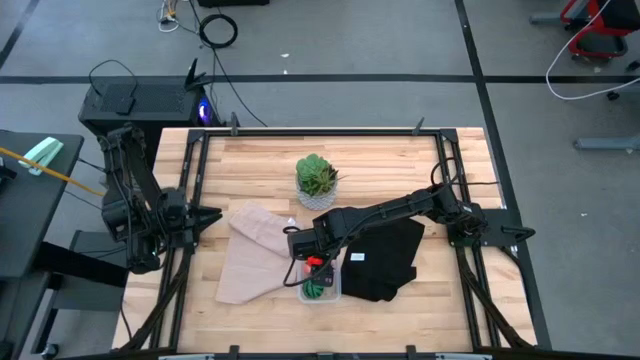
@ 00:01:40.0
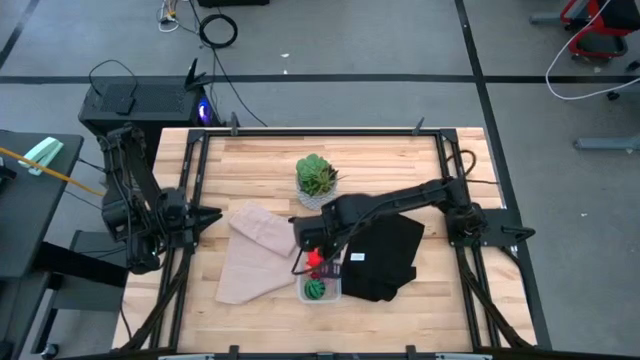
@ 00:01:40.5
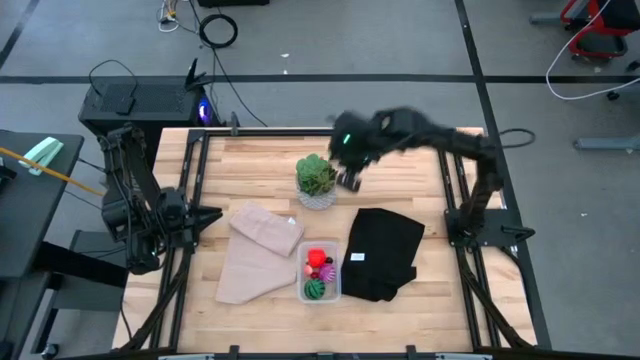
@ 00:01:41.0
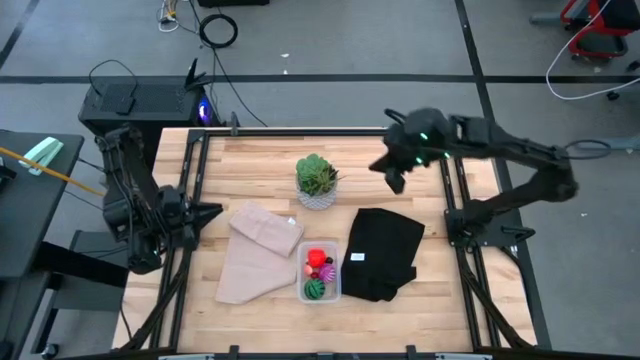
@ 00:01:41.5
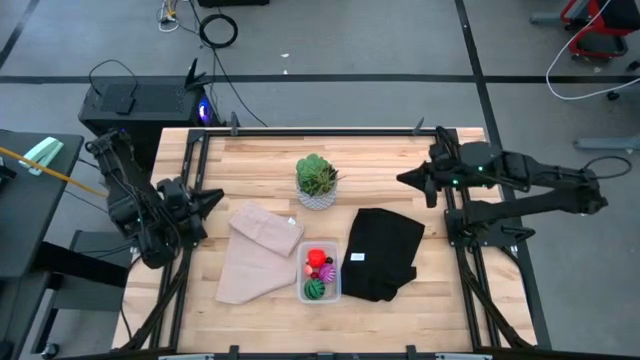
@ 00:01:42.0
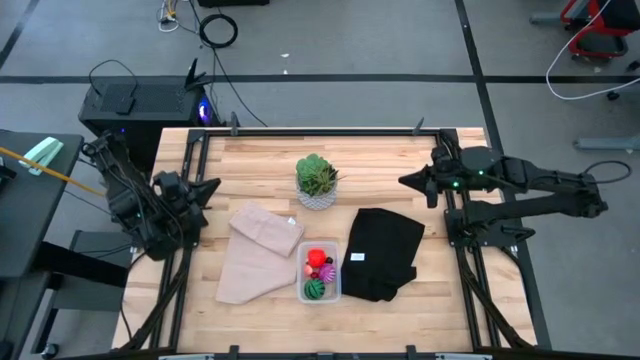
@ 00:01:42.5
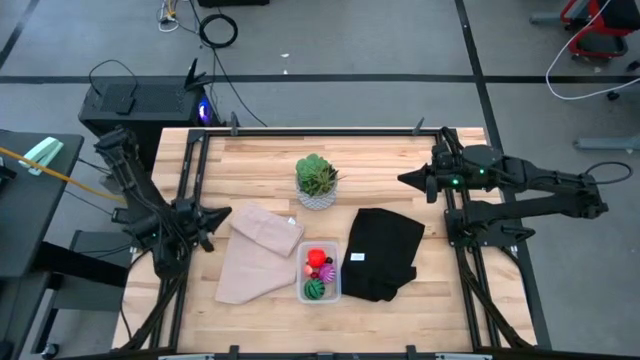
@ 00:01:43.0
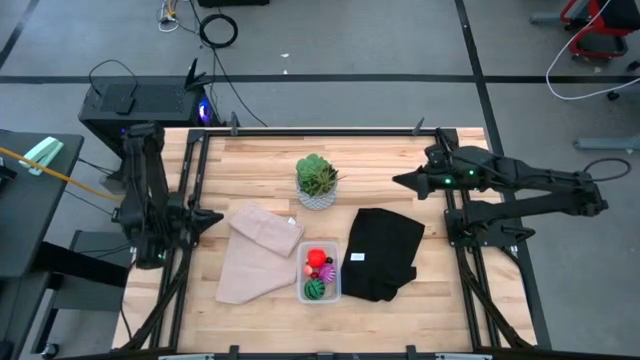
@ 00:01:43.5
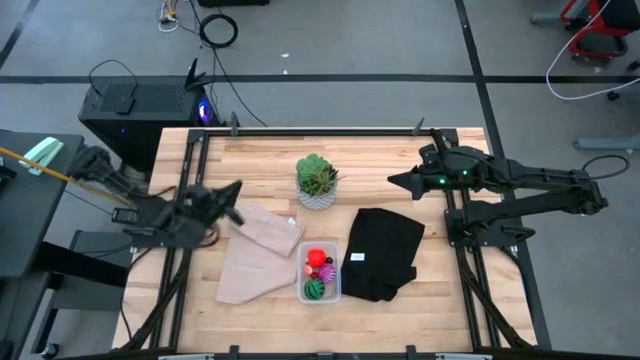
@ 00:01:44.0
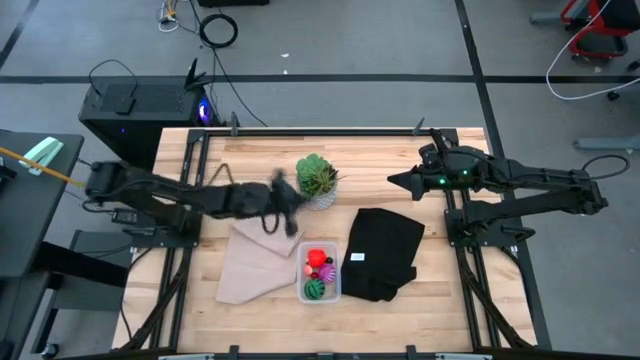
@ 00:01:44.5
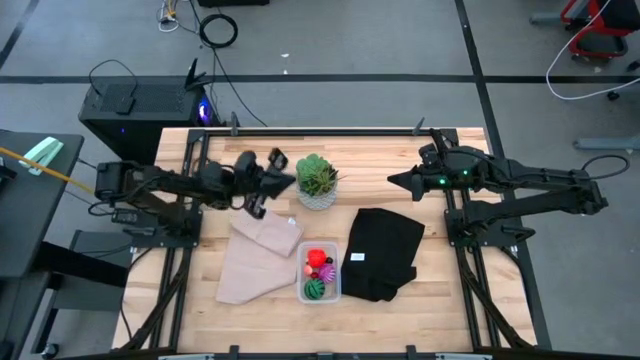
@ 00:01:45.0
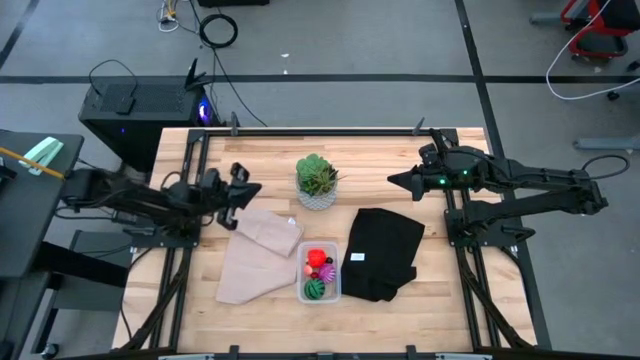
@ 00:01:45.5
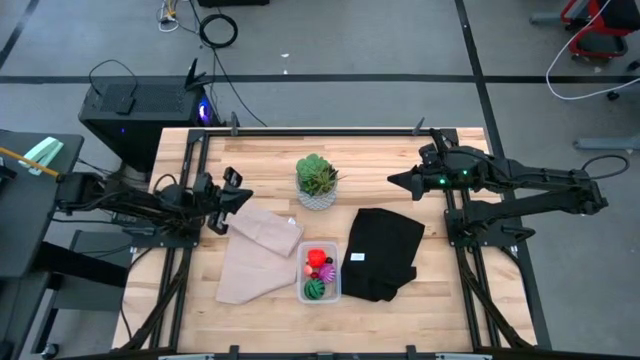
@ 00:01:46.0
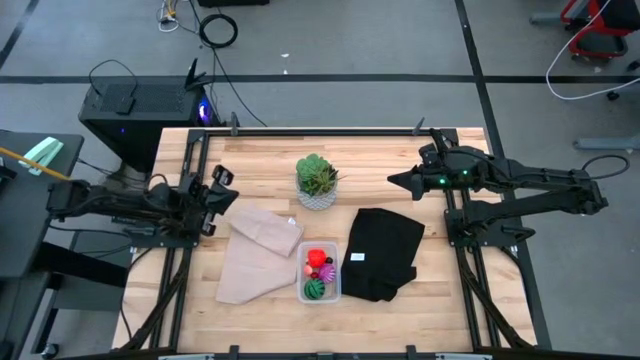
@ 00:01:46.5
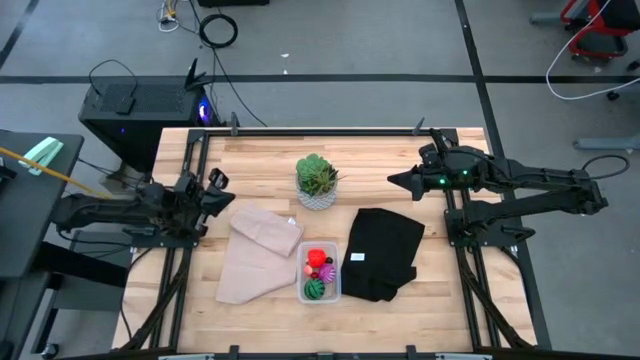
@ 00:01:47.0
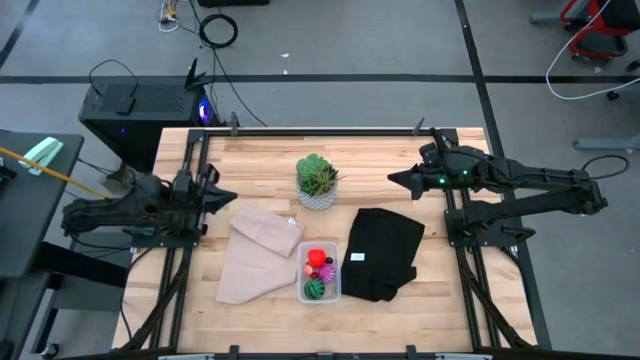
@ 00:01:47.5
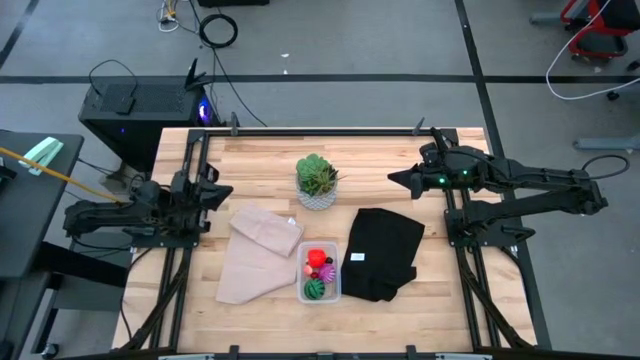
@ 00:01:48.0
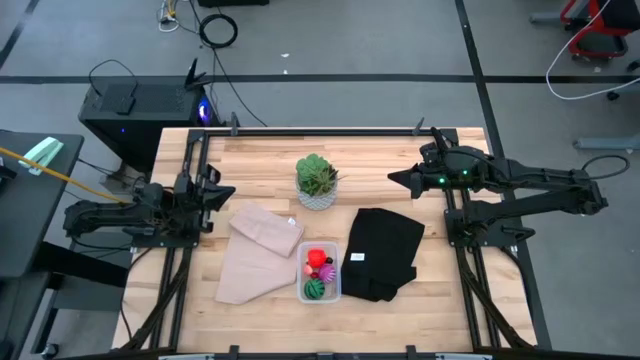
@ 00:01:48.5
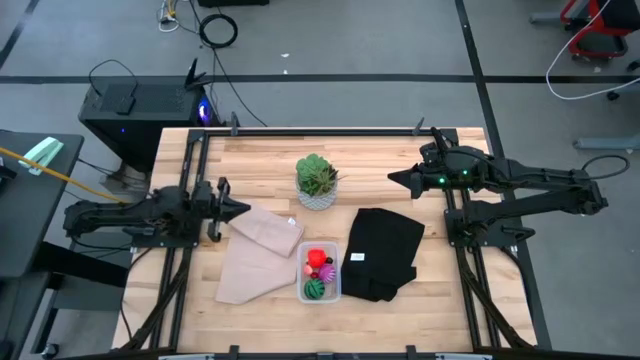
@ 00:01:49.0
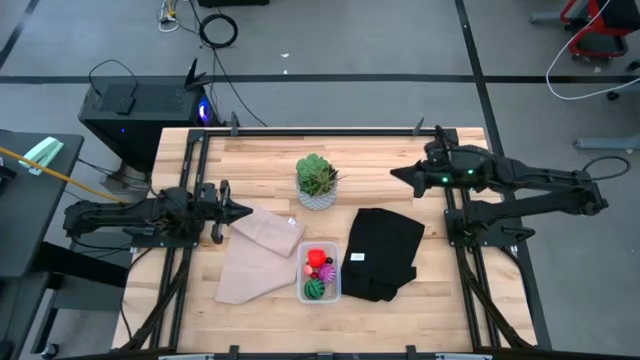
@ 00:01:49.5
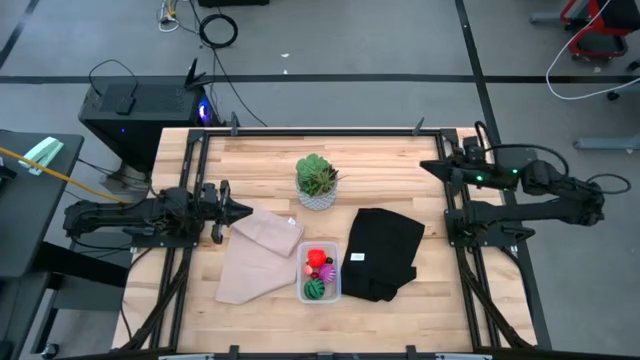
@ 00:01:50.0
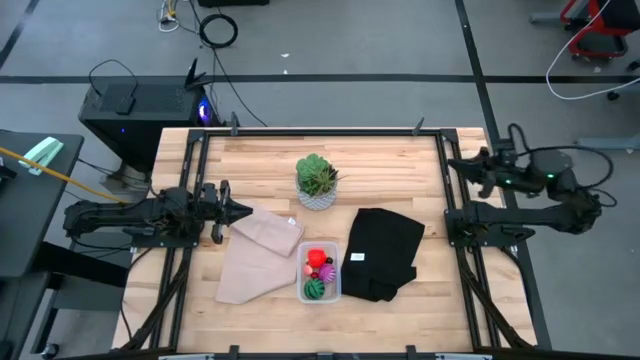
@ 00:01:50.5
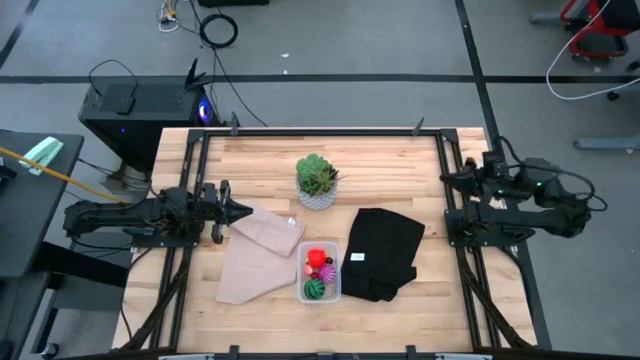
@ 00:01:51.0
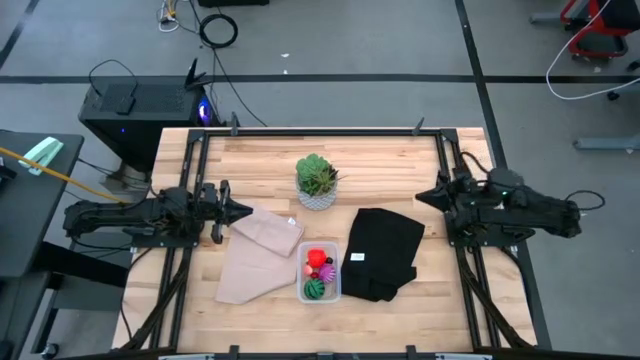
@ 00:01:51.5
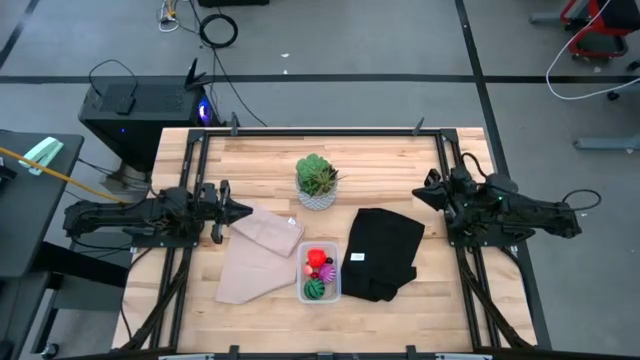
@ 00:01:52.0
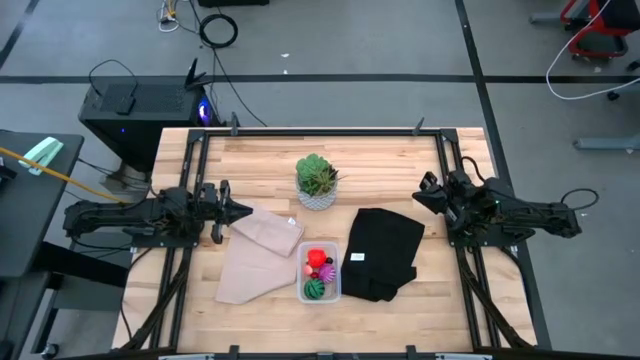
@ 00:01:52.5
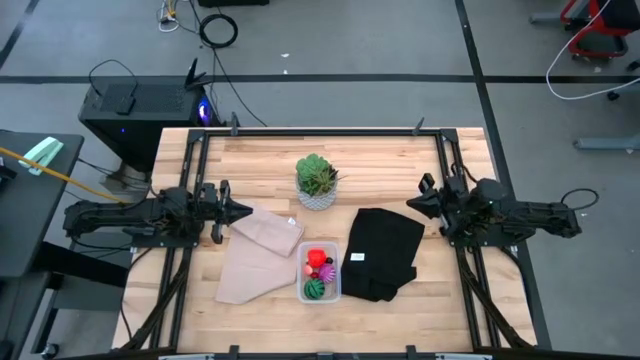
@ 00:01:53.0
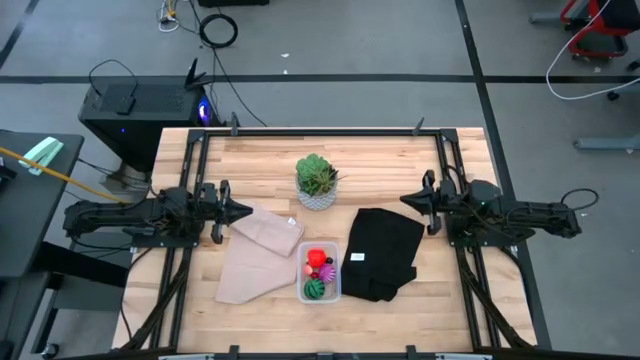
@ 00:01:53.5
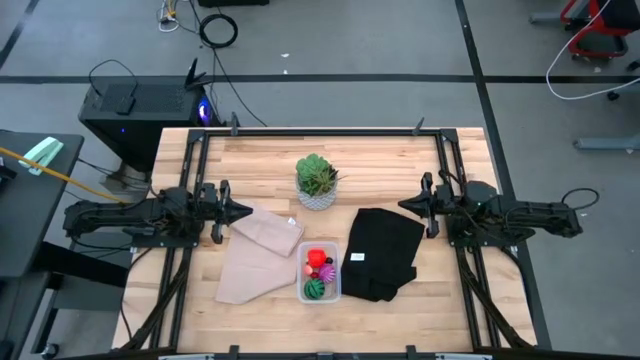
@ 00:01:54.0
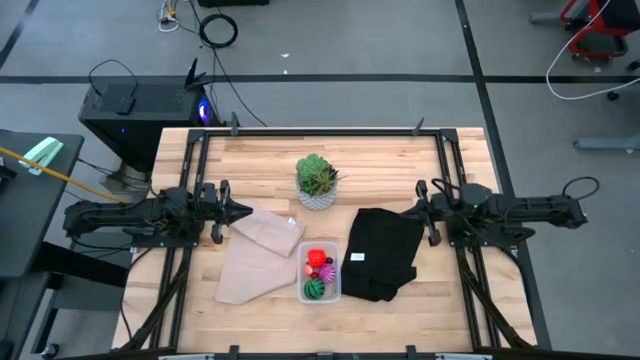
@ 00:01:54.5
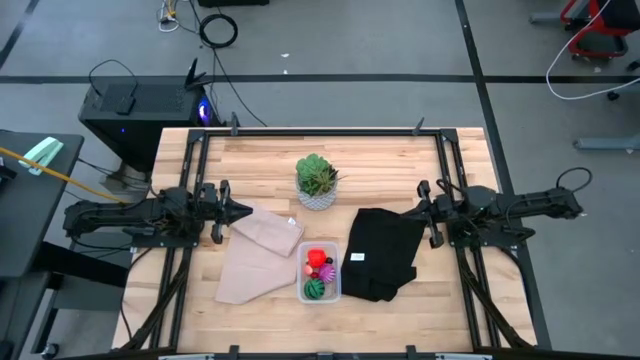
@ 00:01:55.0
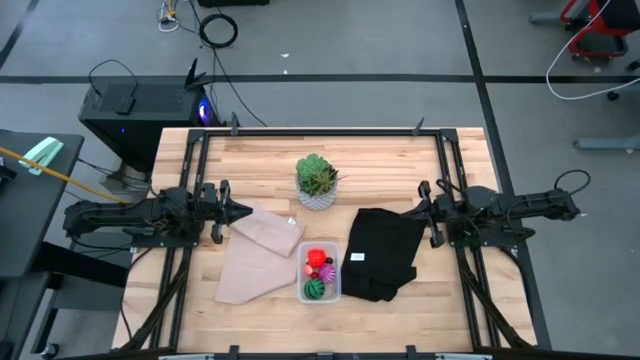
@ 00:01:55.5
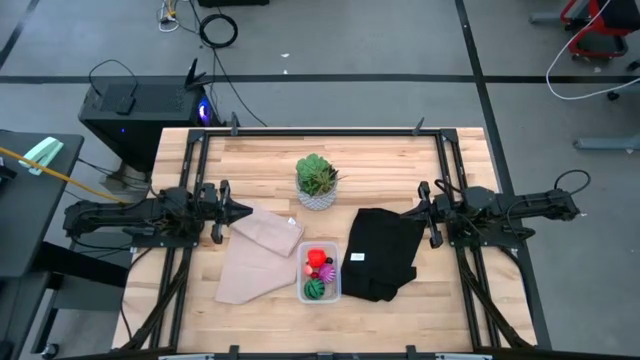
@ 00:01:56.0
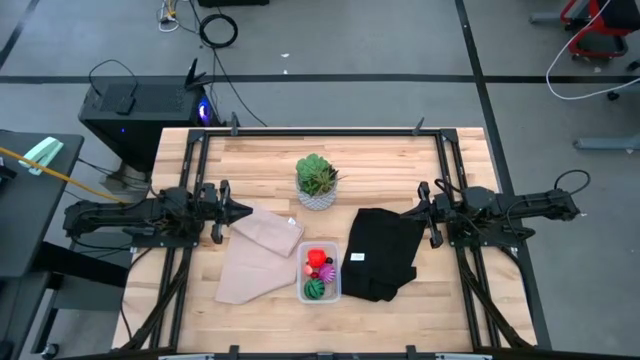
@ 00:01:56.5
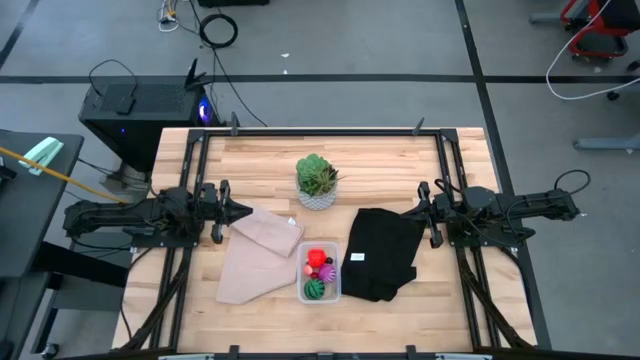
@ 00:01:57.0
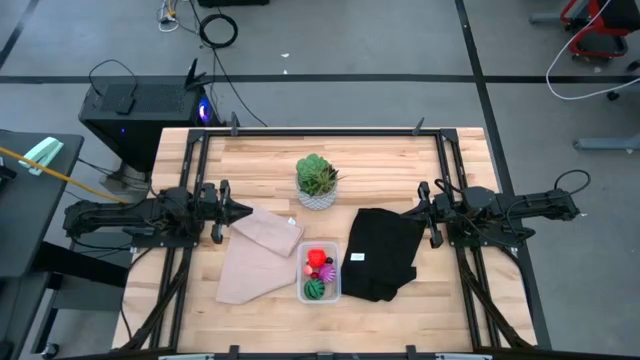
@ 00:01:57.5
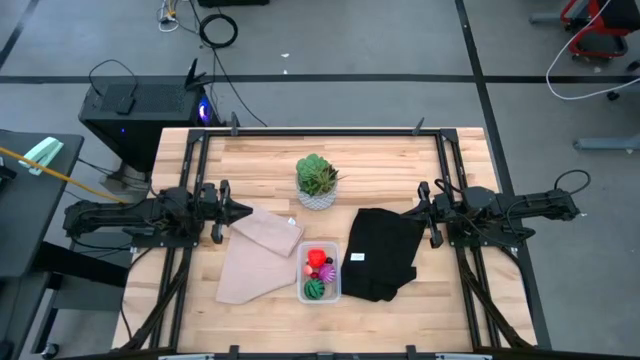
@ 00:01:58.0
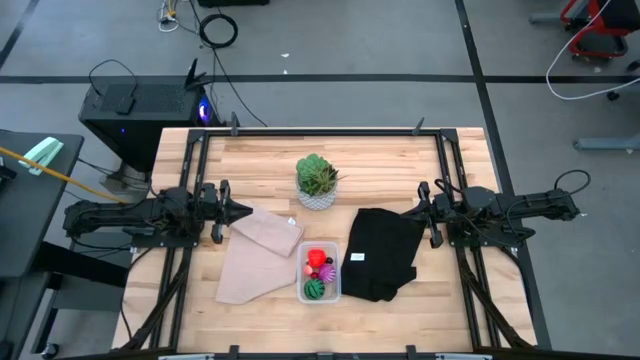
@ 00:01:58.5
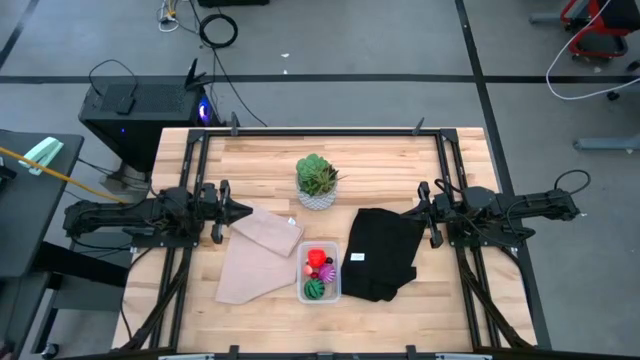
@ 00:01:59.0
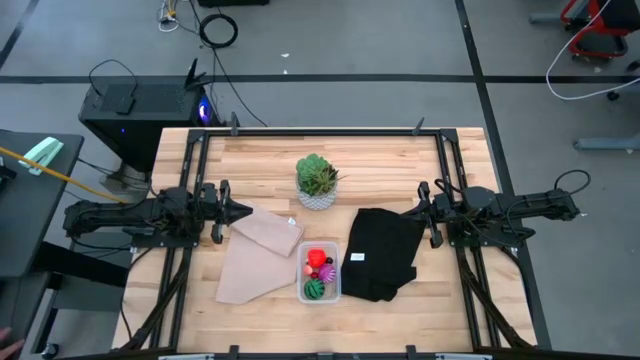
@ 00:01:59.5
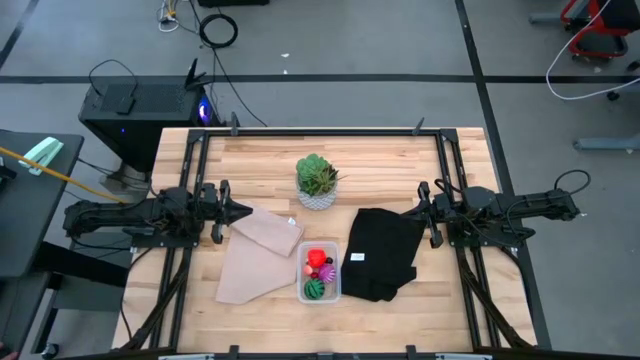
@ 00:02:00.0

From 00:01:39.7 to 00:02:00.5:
Task: Pick and placing Produce into tupperware
Return to Home Position
